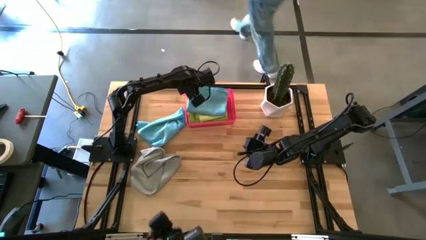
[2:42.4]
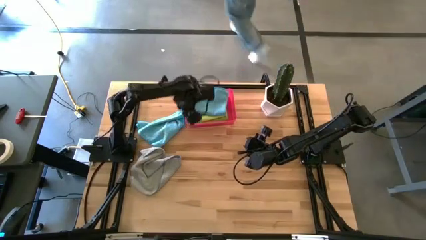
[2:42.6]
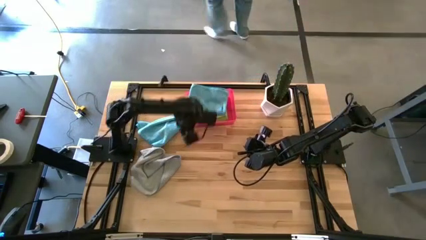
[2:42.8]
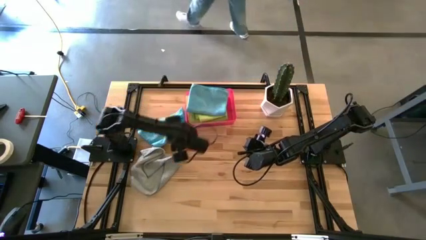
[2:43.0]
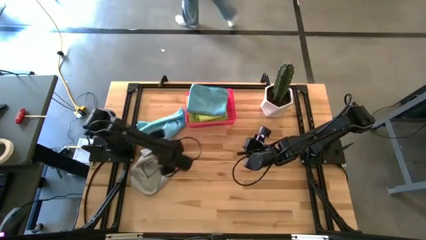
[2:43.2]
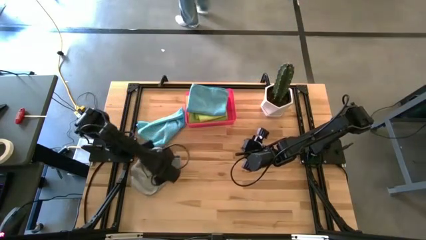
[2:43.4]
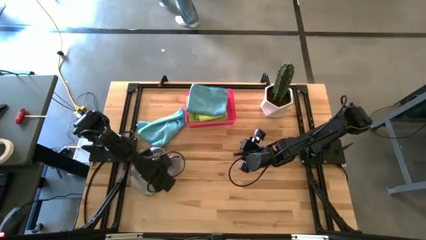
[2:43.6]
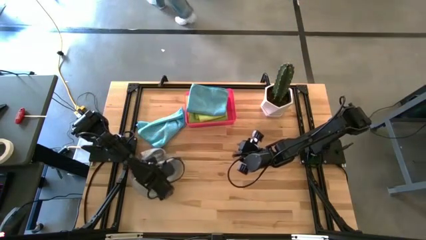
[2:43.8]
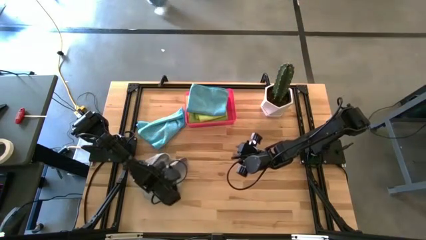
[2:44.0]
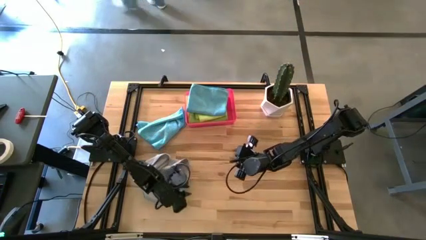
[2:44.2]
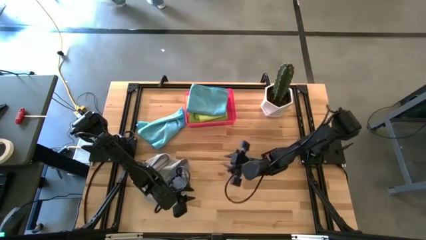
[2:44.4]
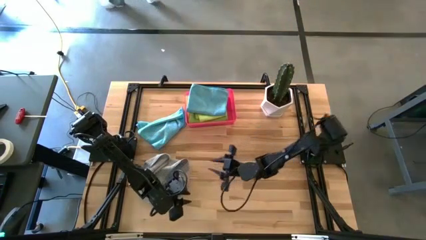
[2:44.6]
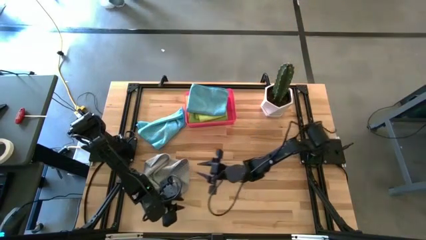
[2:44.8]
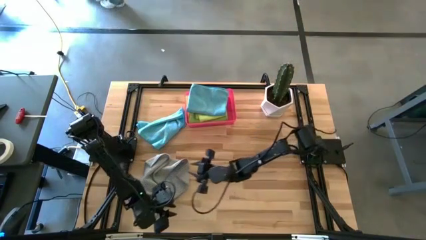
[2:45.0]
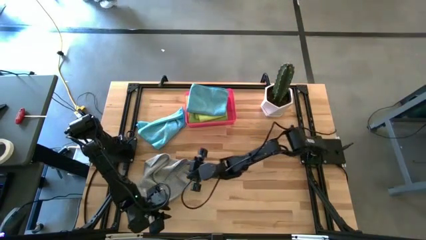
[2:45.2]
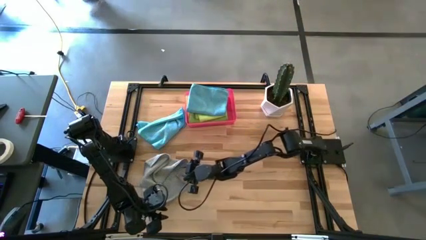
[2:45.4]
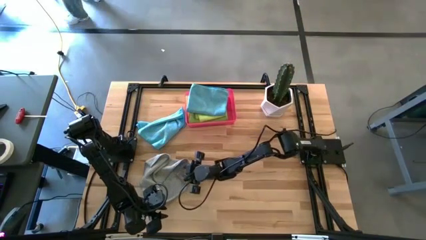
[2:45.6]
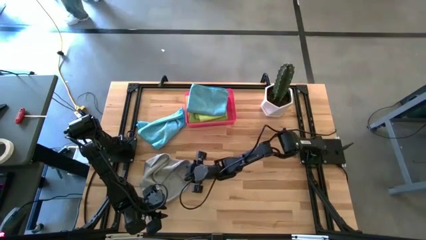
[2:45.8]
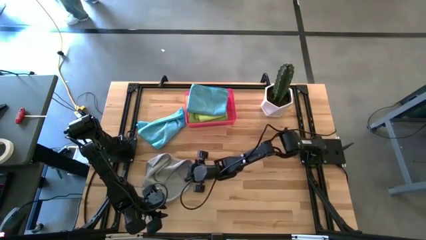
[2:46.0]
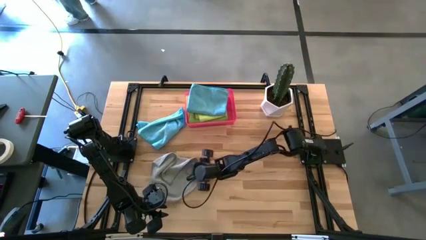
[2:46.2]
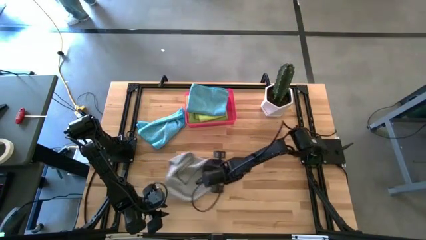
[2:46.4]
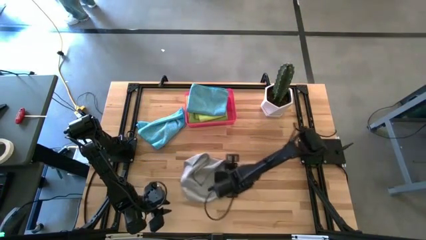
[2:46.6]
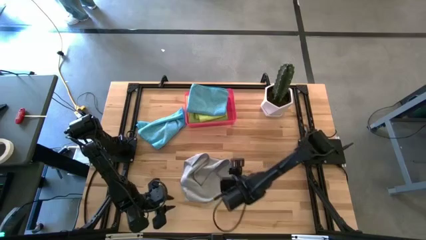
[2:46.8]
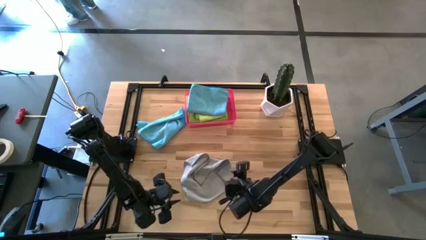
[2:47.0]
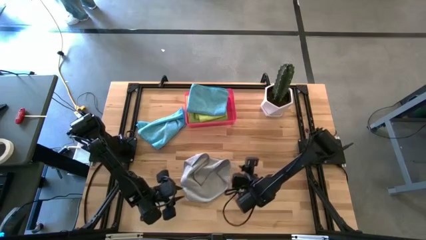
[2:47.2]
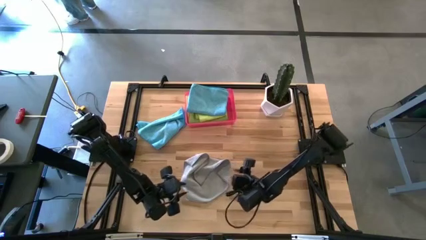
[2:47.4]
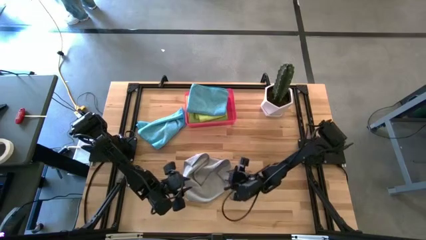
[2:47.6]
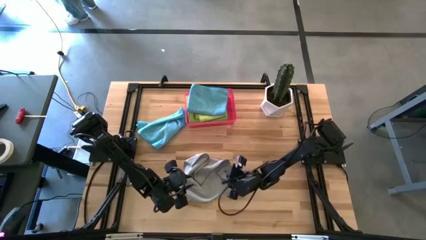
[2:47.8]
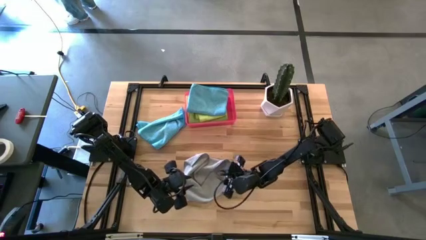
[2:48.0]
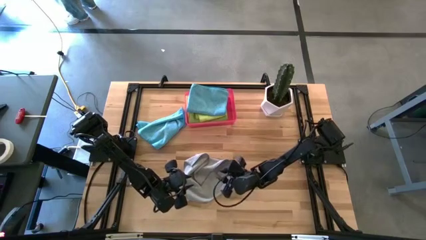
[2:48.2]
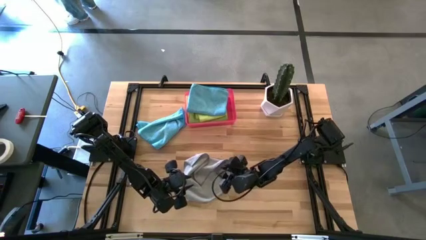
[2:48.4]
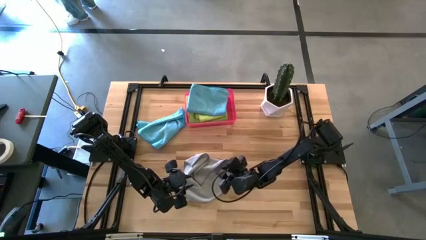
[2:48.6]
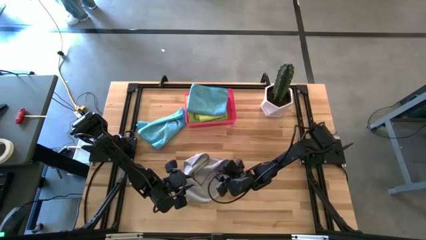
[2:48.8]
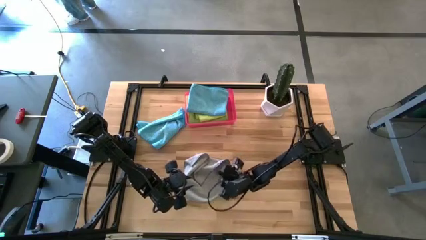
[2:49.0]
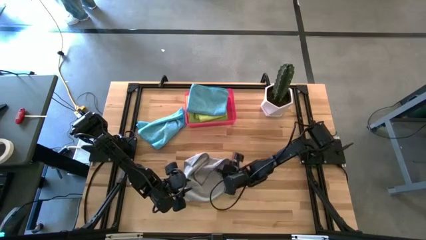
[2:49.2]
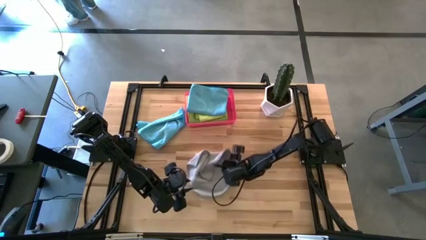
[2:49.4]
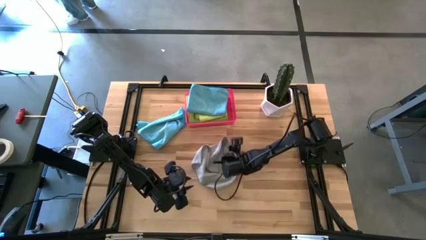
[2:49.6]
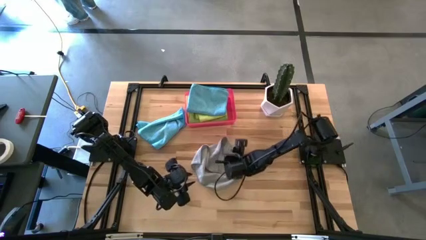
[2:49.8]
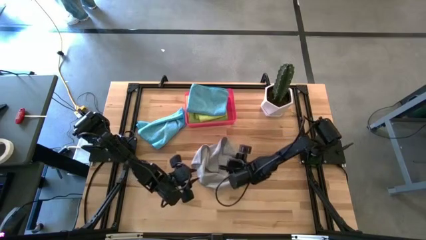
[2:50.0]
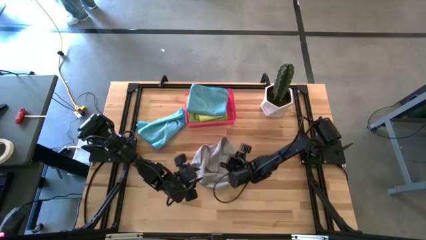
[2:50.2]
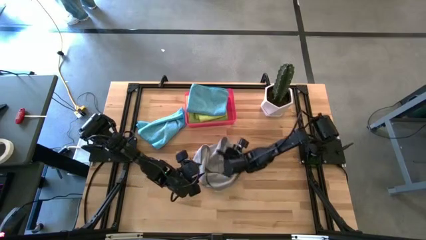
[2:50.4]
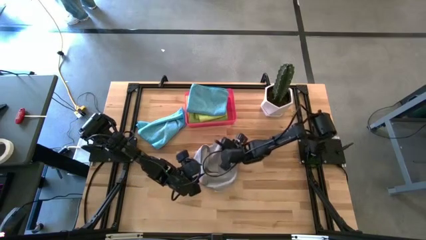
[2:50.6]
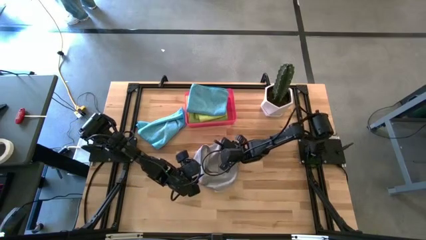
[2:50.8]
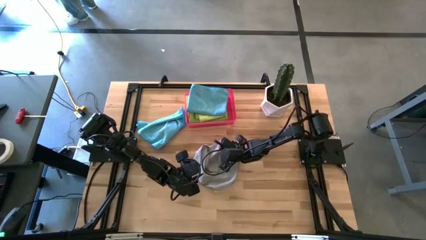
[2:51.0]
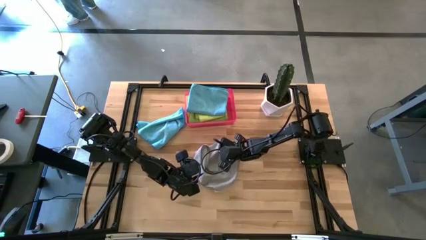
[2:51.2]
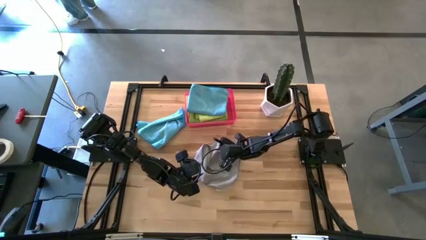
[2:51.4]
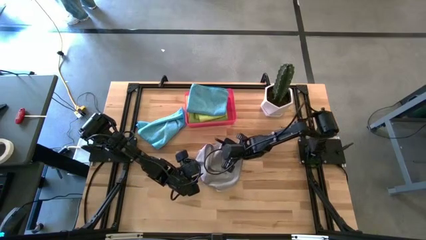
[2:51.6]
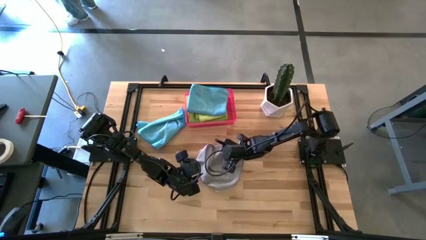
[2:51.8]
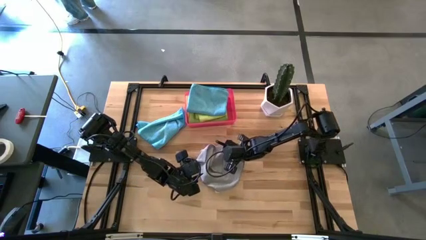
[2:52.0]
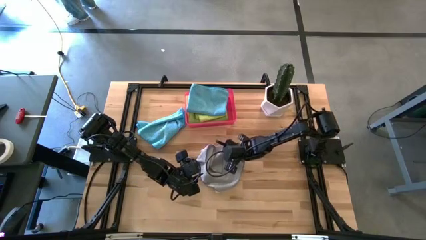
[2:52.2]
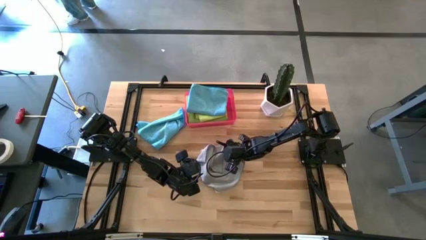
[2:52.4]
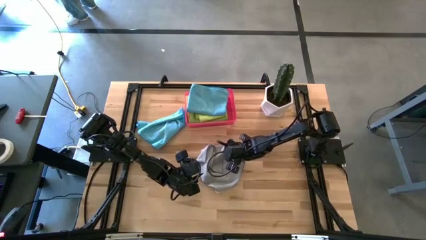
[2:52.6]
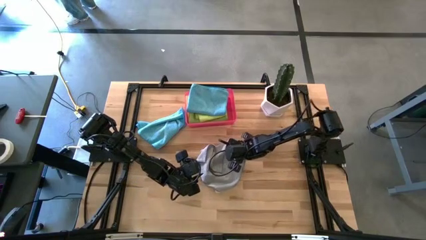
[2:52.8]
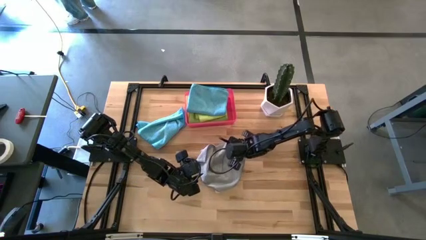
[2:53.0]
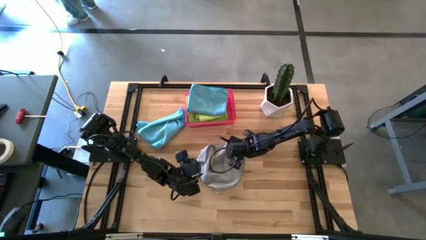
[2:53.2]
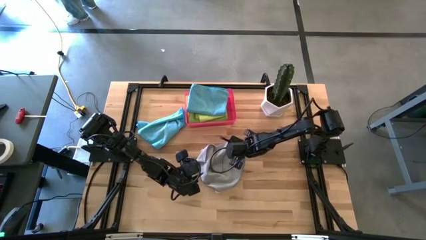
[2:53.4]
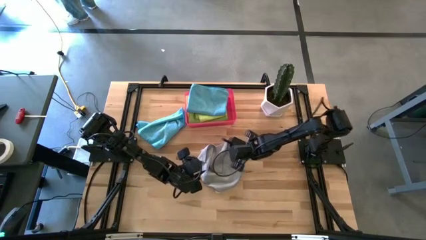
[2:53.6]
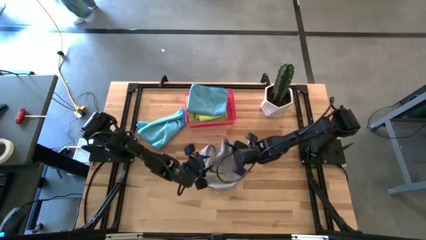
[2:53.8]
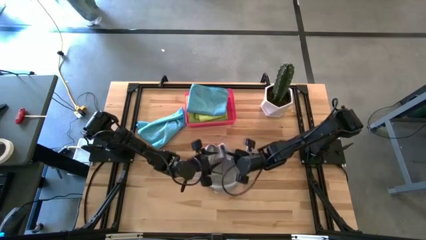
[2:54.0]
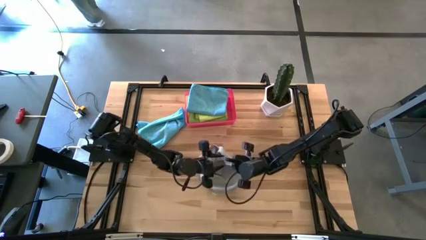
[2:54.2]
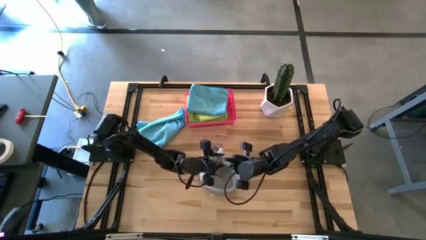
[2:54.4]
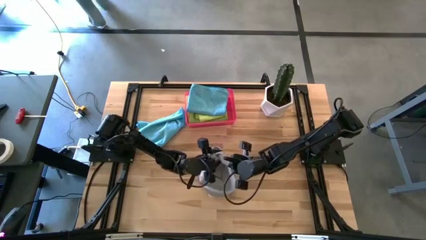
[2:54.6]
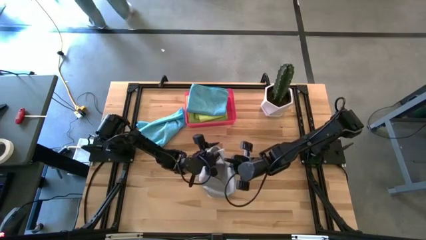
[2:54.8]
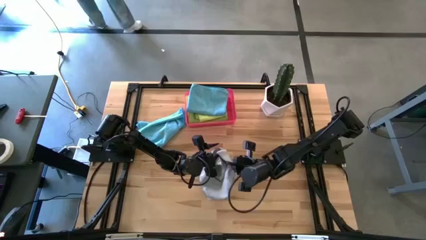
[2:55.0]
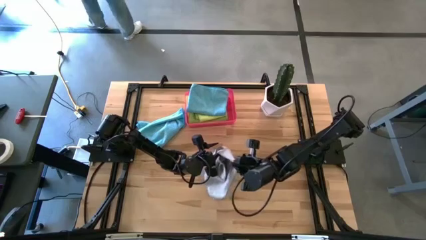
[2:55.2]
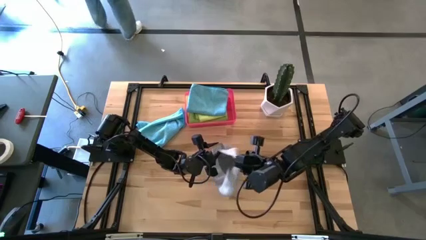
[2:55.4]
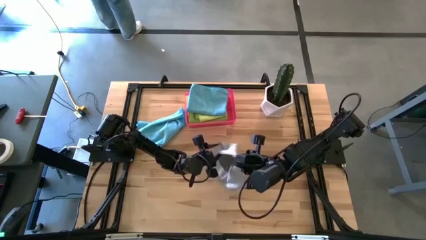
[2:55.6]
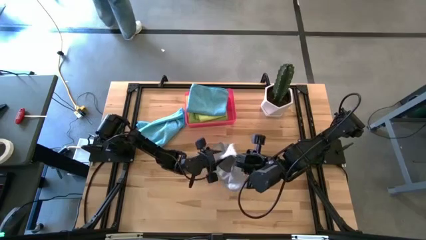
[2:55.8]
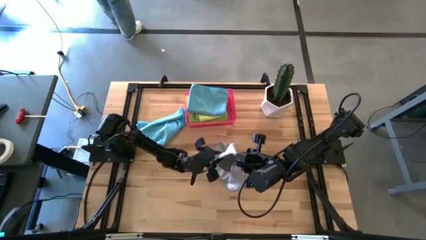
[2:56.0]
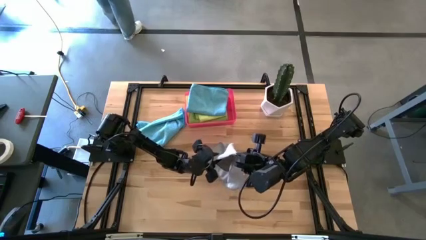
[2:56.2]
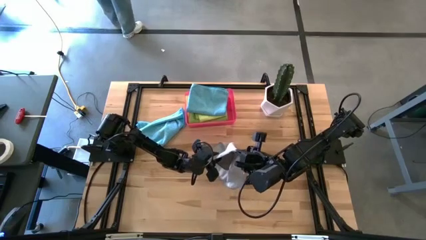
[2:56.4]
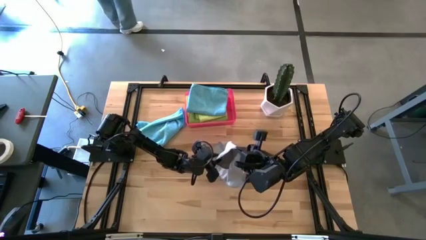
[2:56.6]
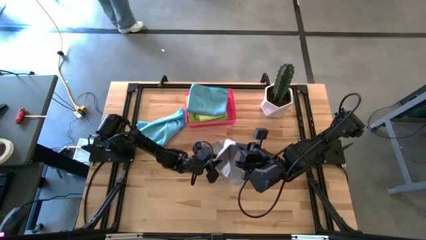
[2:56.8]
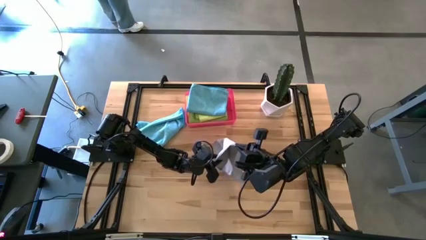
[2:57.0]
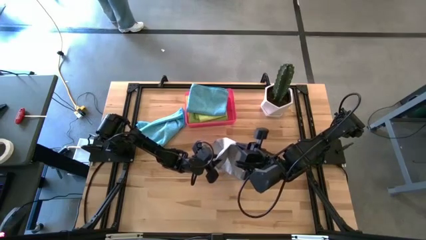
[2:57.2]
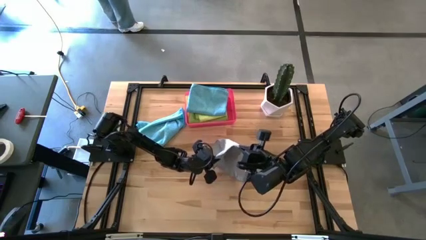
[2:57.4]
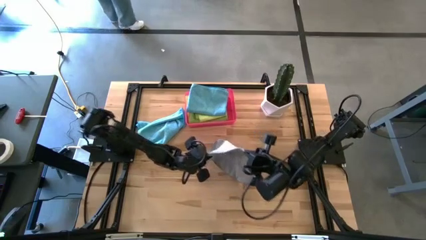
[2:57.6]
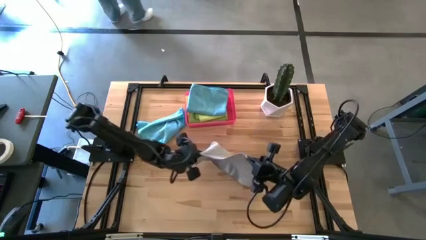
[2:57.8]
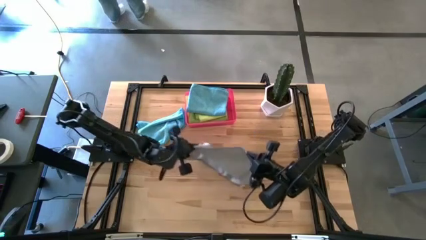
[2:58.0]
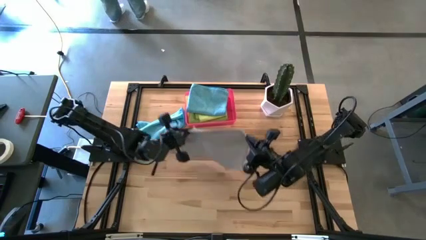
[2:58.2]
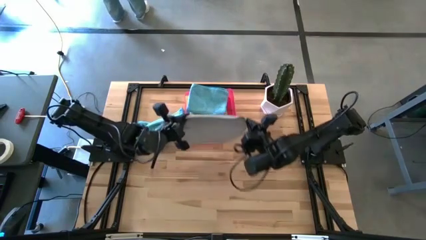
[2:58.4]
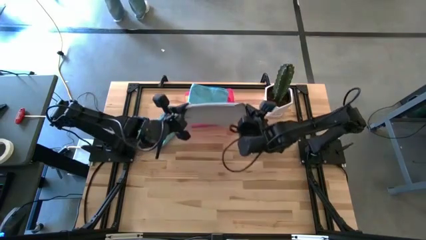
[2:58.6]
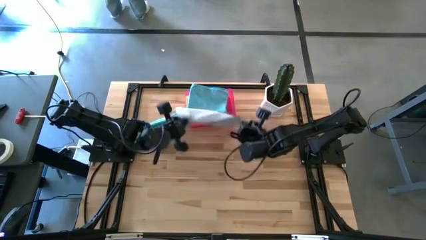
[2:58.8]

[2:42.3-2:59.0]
Task: Fold microfiber towels
Fold the gray microfiber cloth
